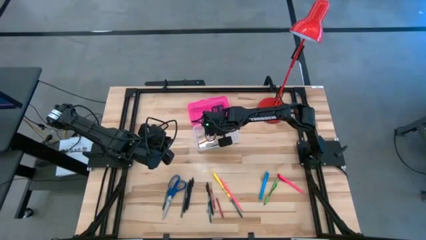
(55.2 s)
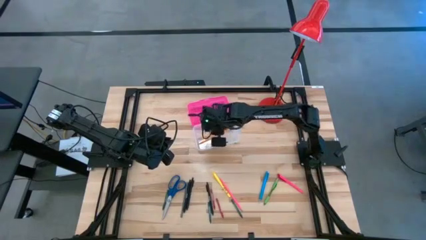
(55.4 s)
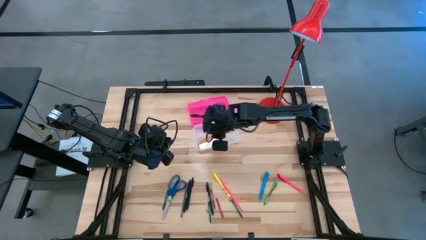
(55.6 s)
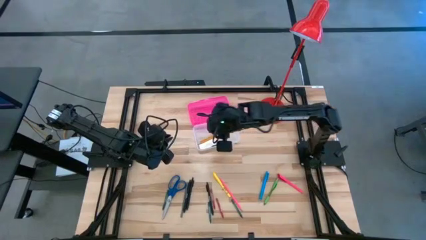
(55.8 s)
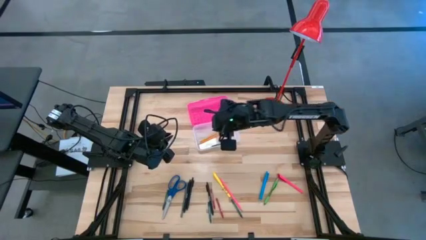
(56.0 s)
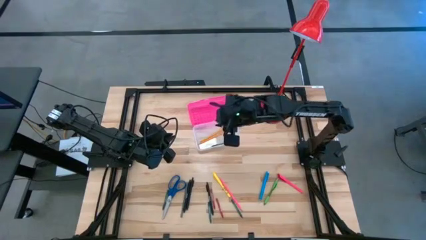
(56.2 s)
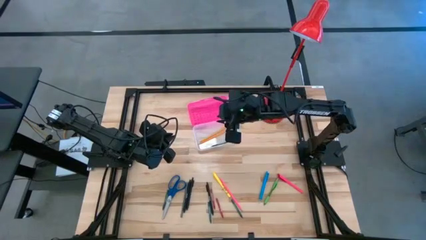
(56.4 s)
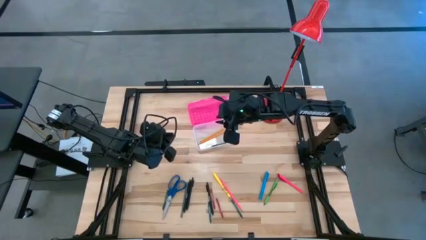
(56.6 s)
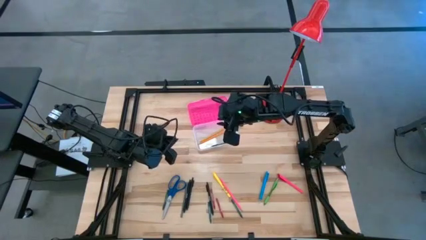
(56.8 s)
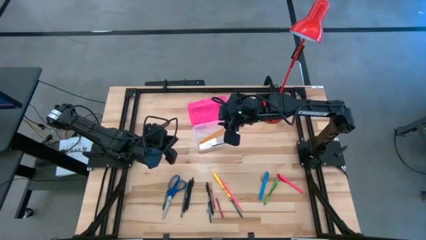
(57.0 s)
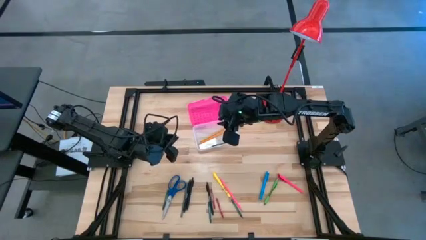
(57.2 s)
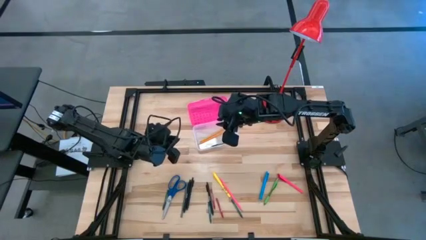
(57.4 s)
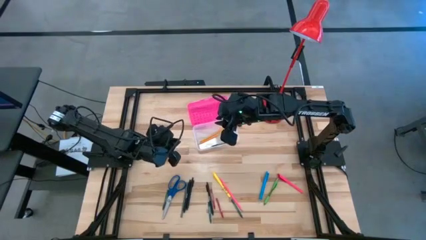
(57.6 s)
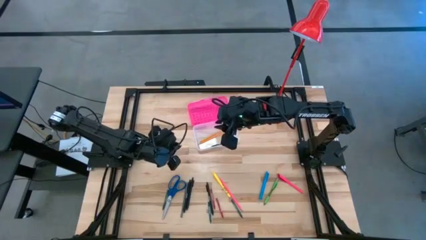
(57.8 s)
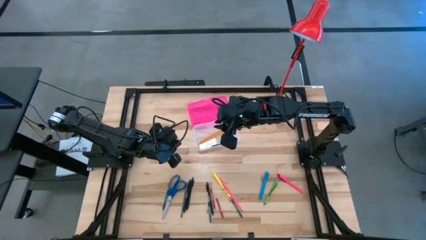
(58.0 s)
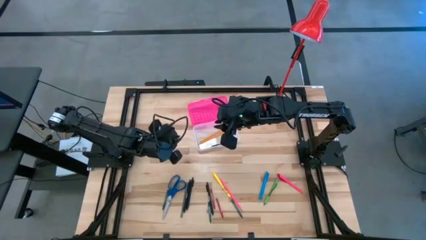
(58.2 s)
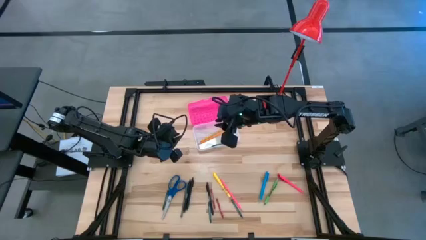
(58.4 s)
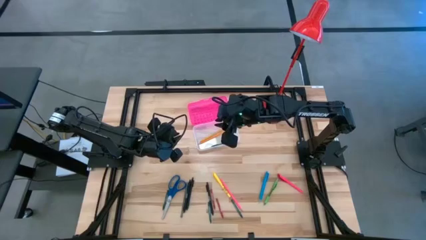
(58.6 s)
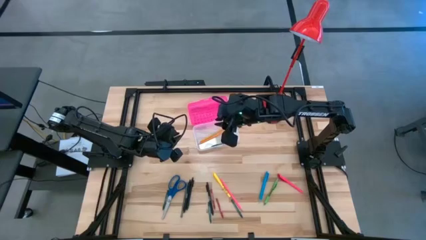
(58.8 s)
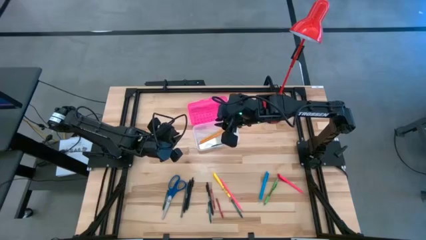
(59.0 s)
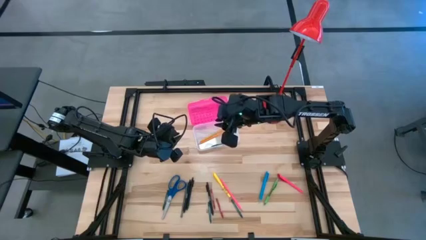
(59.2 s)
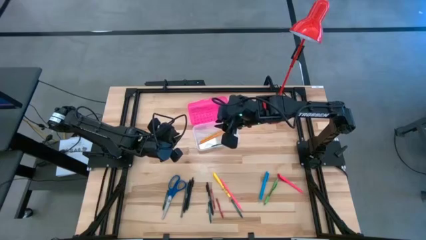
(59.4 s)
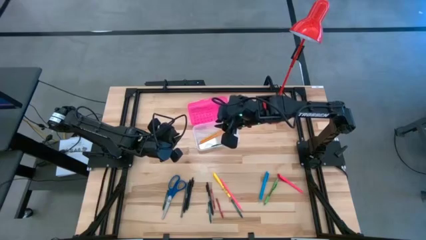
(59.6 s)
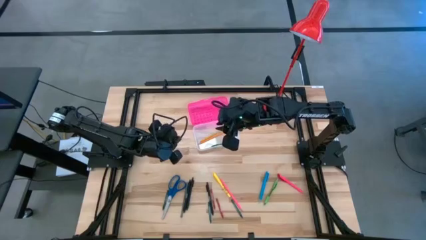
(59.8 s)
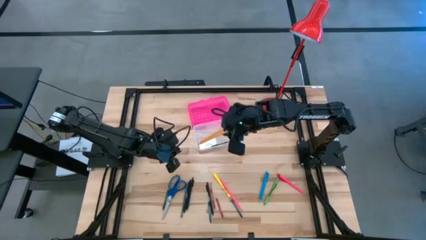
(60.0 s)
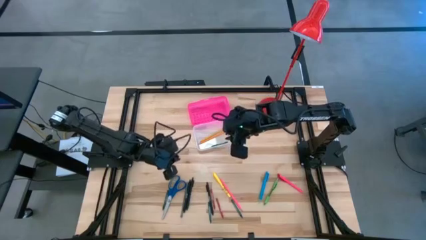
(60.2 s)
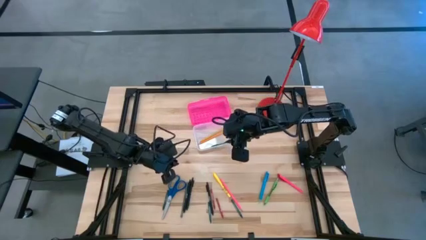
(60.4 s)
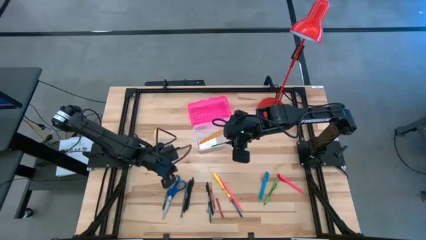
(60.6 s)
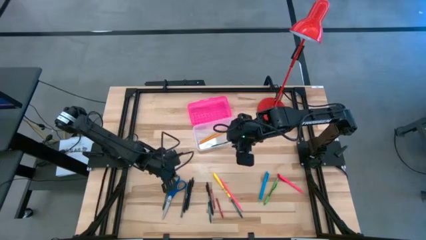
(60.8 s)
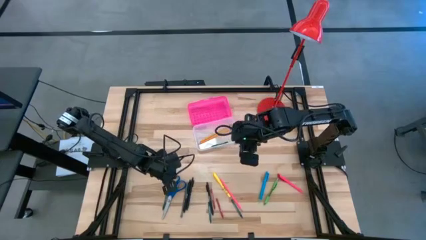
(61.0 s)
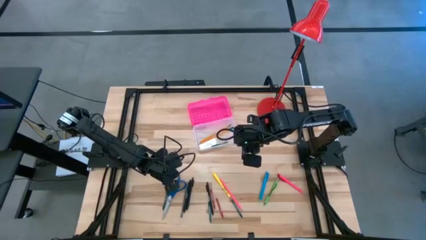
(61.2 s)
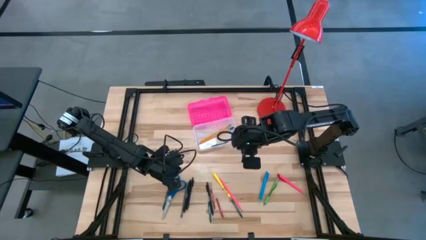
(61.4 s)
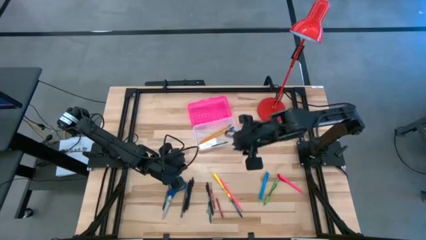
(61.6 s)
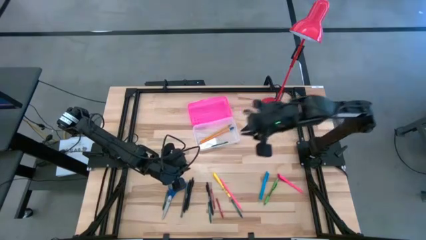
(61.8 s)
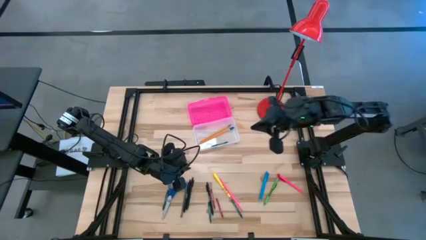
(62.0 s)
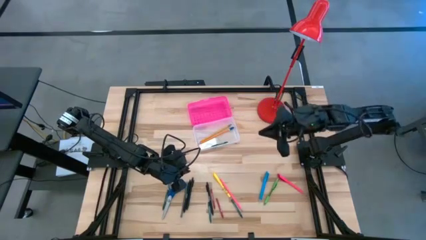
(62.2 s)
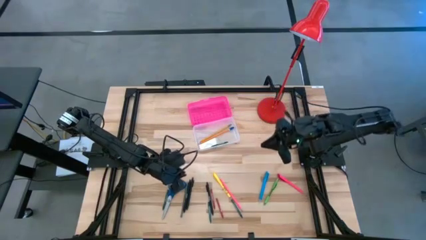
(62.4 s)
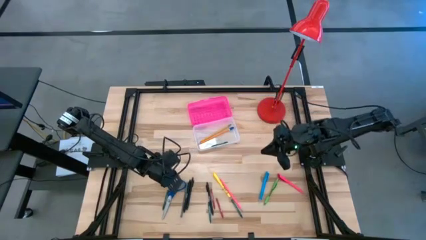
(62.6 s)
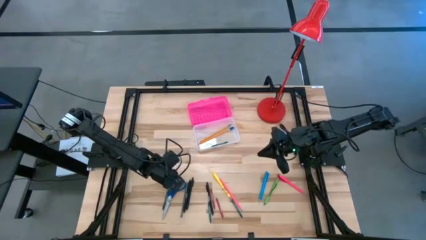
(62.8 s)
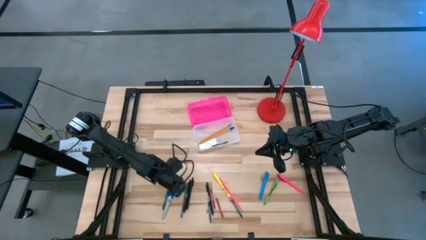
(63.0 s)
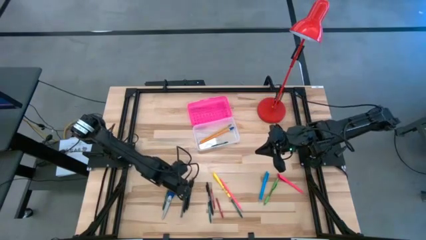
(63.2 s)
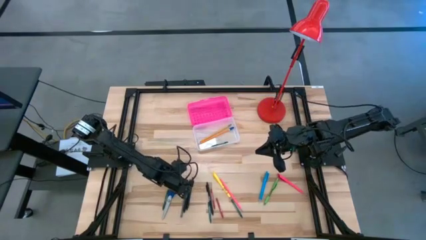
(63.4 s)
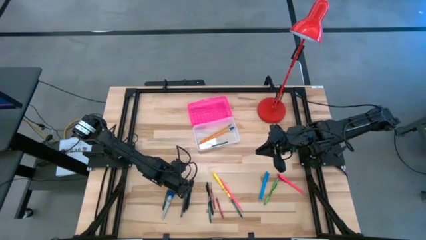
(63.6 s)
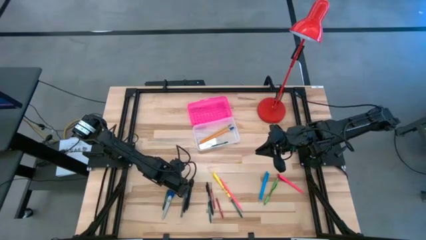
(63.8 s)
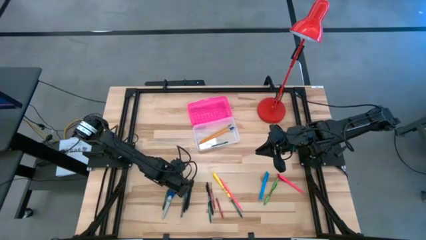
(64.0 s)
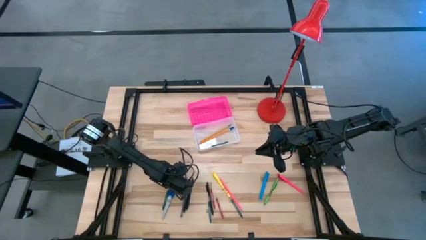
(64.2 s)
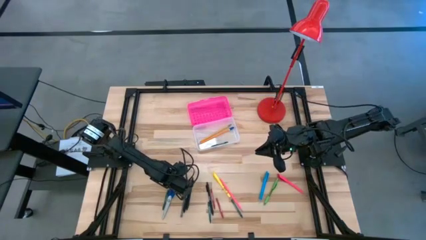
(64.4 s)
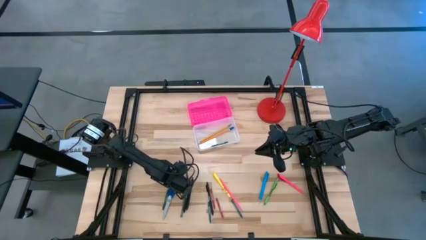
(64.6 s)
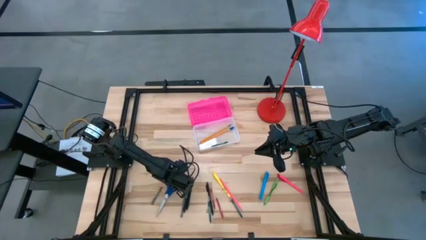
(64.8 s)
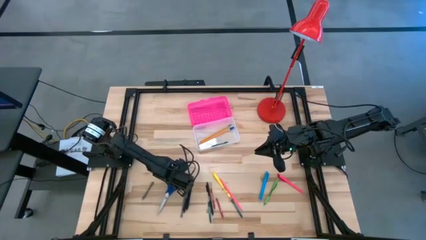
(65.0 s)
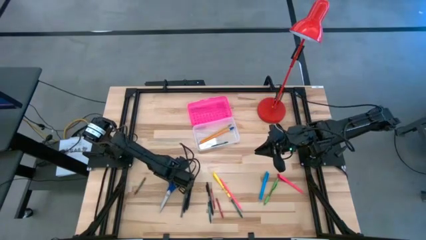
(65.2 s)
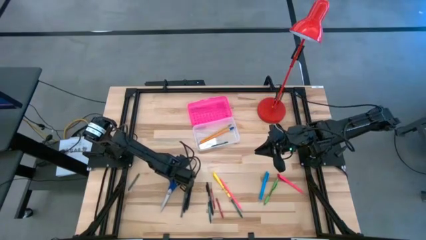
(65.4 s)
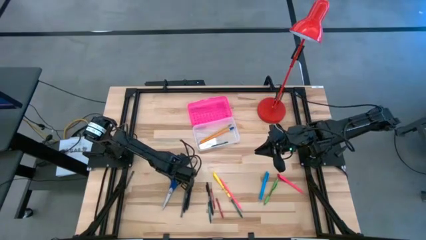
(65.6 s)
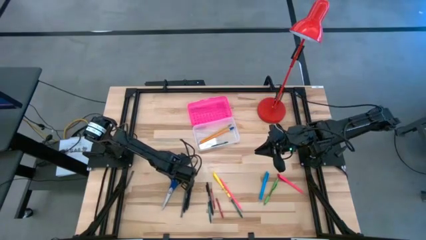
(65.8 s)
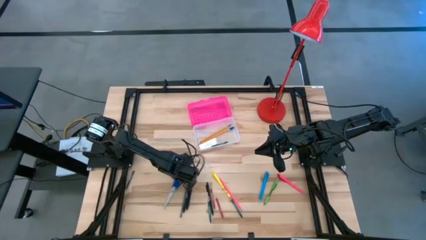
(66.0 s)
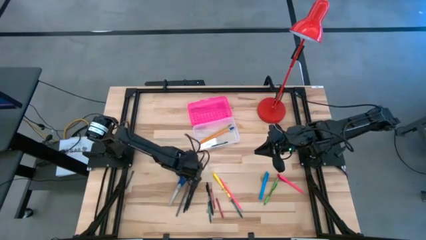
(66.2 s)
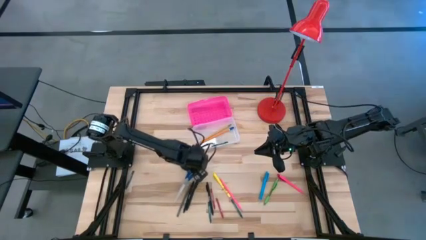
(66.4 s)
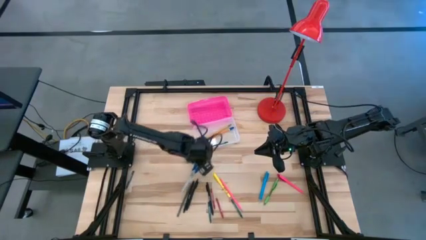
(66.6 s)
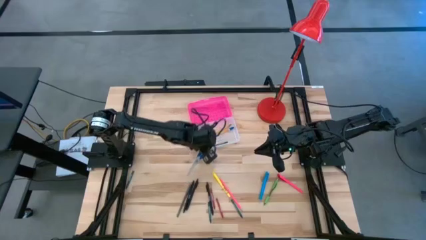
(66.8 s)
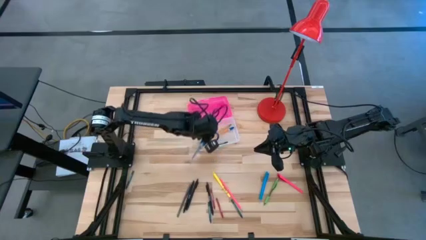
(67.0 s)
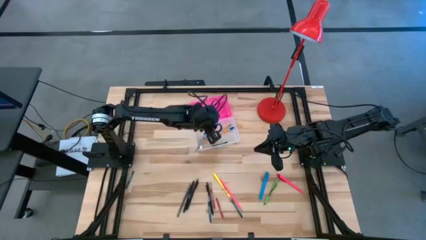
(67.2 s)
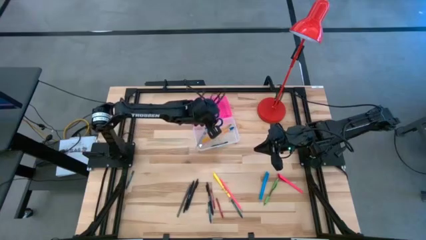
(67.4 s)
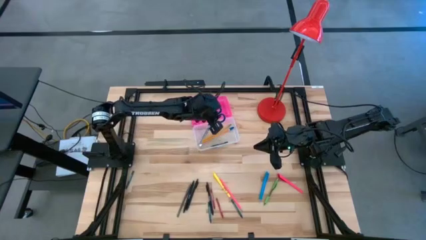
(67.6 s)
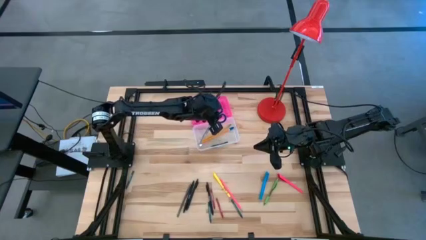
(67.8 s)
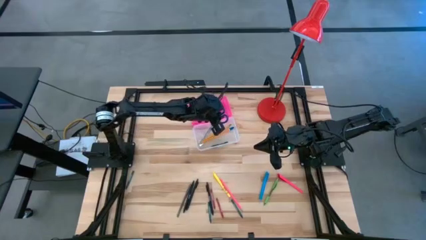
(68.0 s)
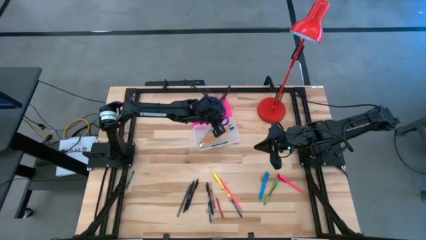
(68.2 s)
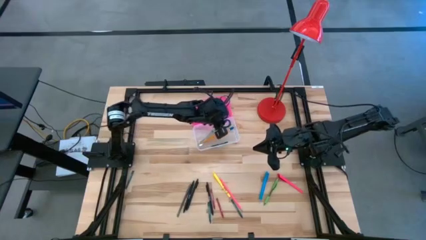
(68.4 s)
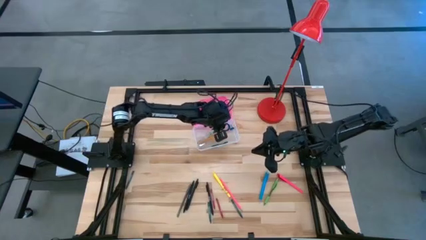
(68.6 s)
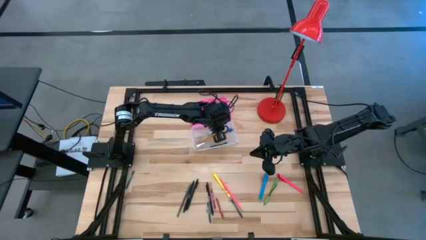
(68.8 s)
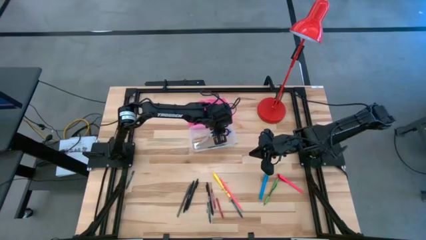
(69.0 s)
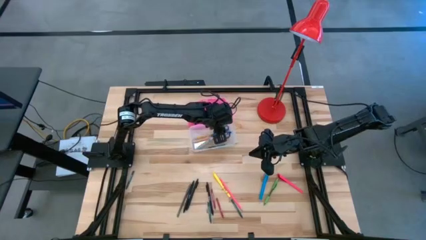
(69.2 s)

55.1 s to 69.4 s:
Task: Pick & place school supplies into a supply box
Put the blue scissors into the pink supply box

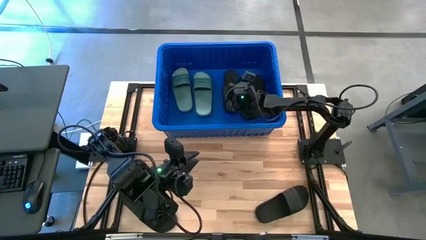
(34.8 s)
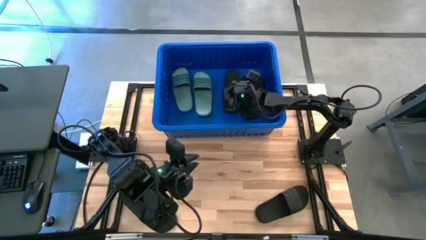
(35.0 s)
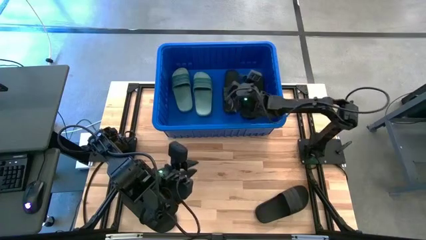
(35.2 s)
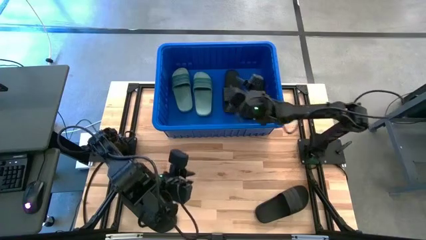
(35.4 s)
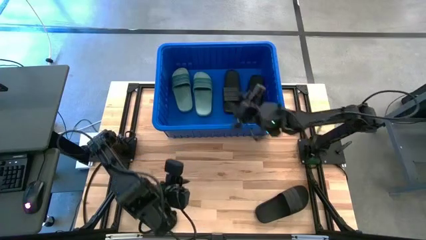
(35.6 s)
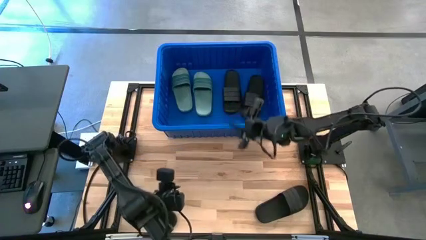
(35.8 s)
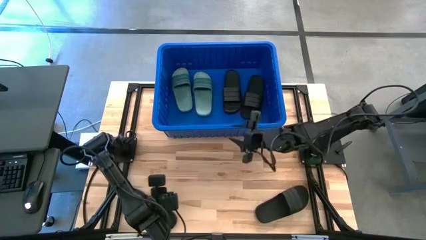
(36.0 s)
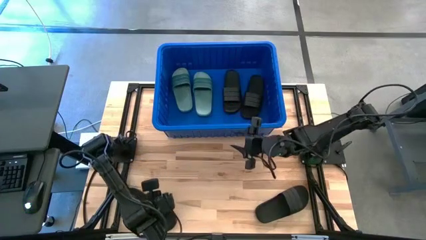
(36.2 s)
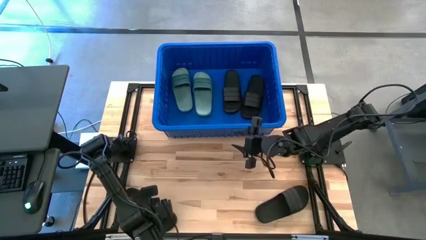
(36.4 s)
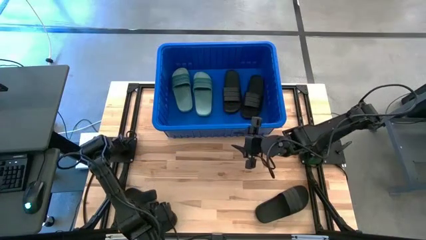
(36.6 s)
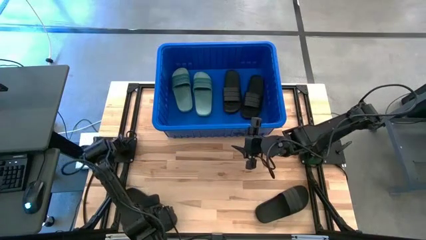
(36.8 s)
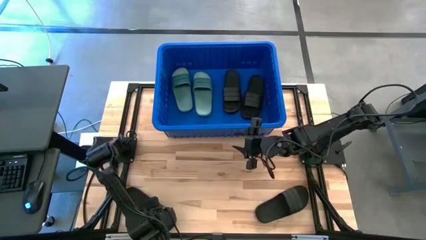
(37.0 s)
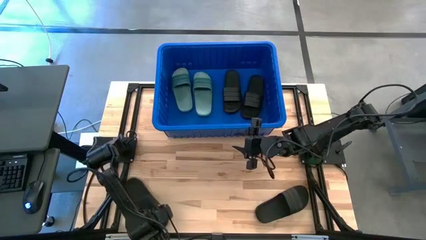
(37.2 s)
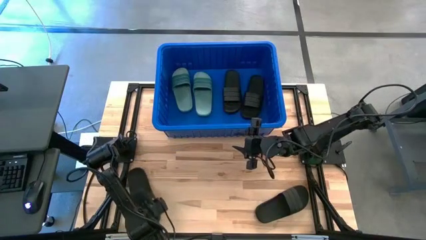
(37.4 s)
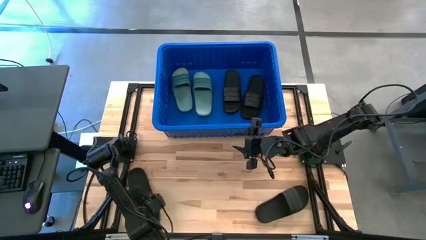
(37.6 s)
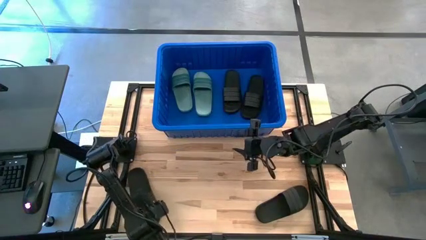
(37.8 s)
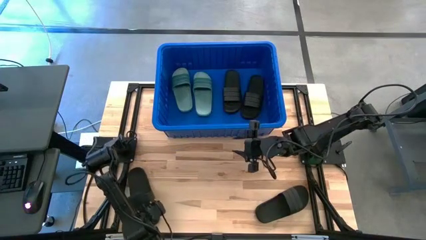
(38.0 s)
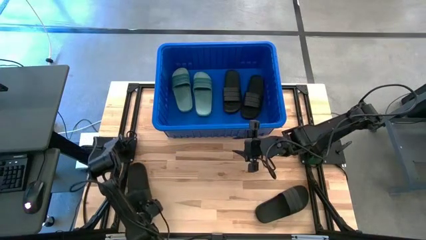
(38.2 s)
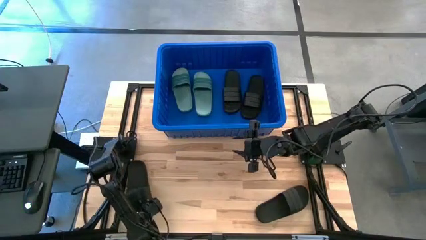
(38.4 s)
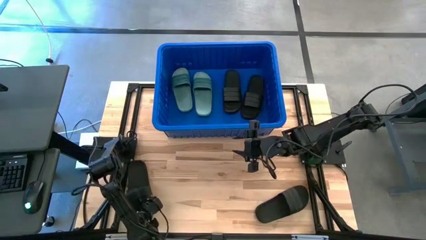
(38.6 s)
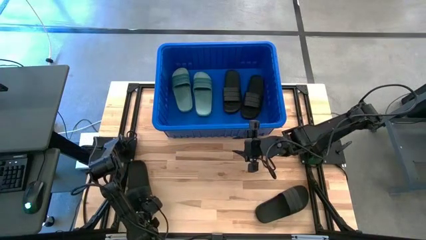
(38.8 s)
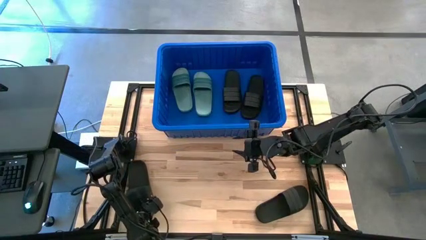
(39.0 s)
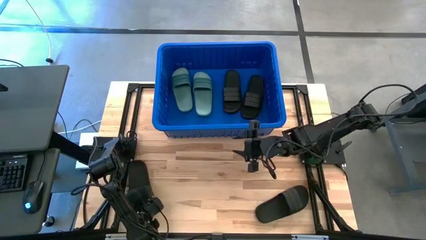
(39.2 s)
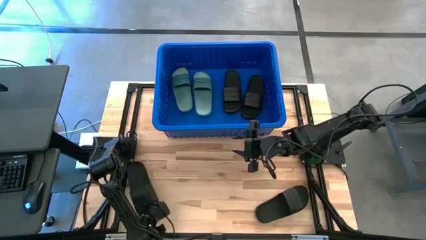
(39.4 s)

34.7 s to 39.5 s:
Task: Pick and place slides into bin
Put the black slide into the blue bin
